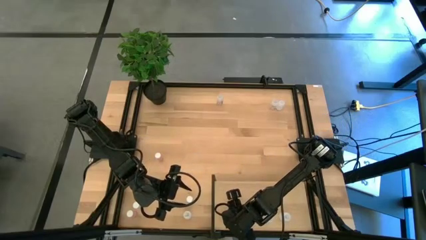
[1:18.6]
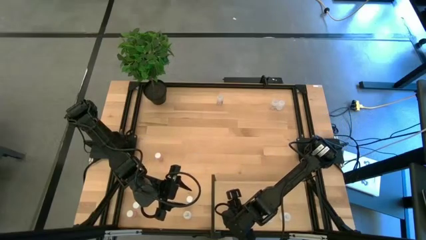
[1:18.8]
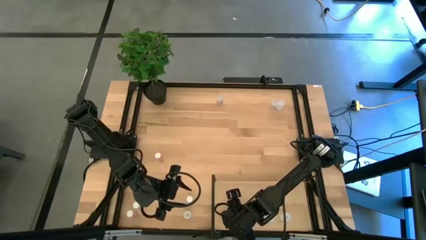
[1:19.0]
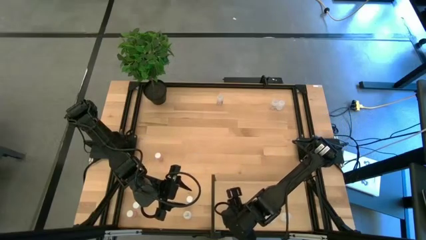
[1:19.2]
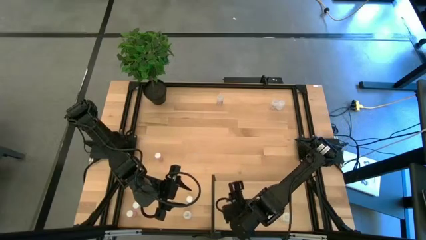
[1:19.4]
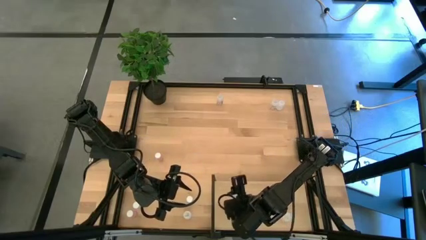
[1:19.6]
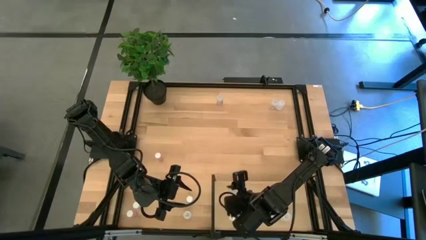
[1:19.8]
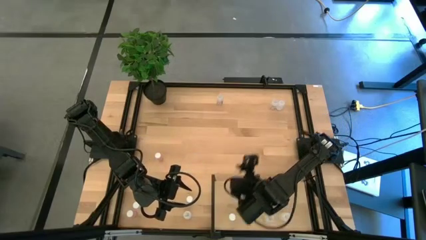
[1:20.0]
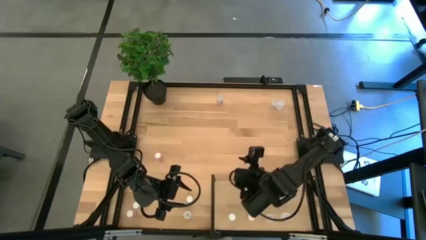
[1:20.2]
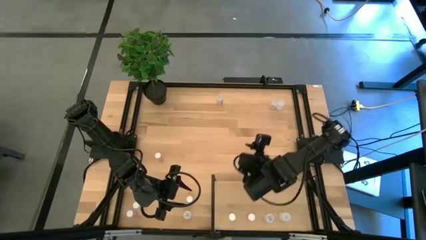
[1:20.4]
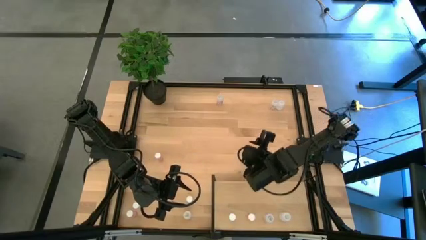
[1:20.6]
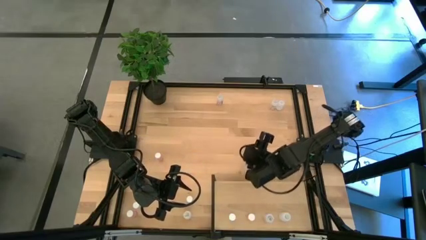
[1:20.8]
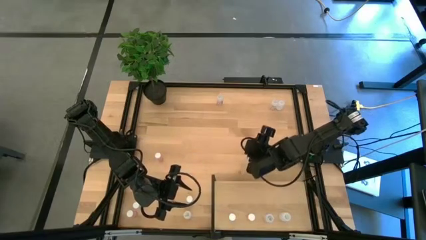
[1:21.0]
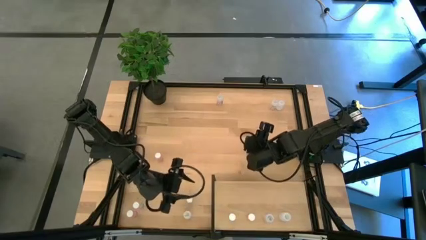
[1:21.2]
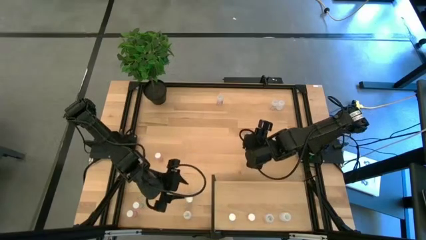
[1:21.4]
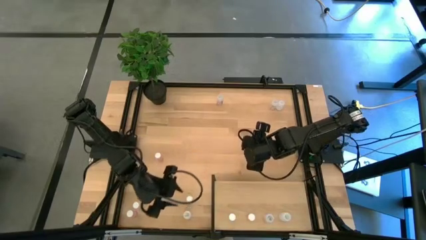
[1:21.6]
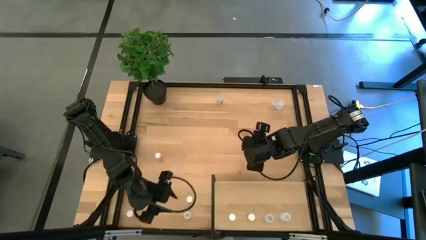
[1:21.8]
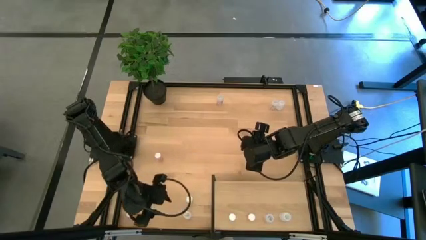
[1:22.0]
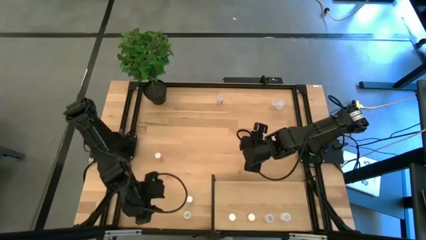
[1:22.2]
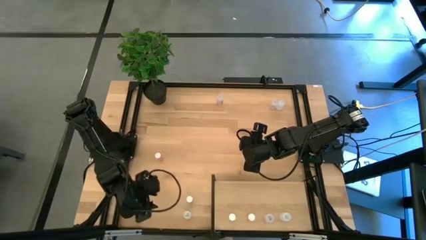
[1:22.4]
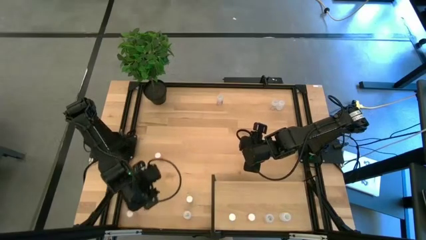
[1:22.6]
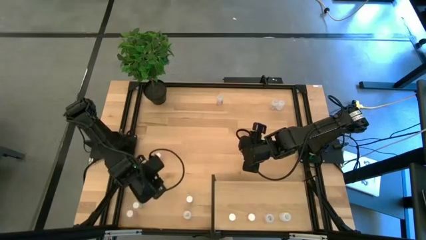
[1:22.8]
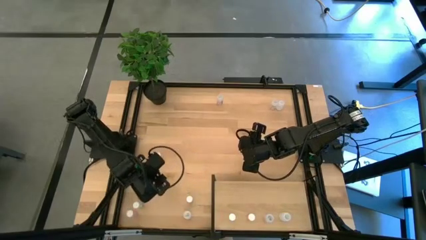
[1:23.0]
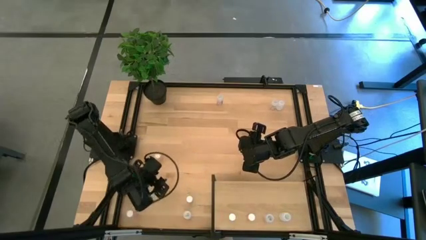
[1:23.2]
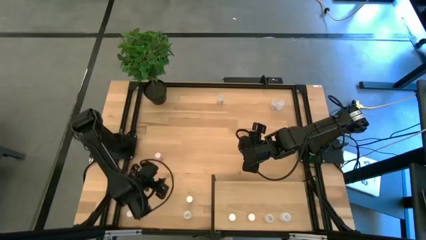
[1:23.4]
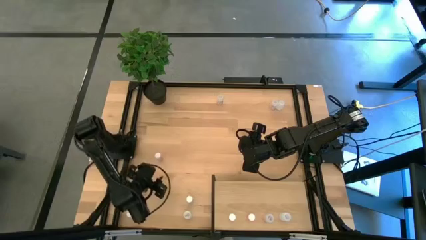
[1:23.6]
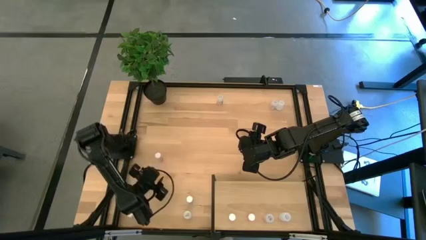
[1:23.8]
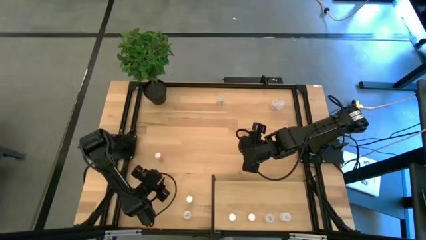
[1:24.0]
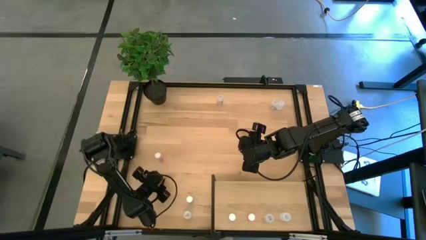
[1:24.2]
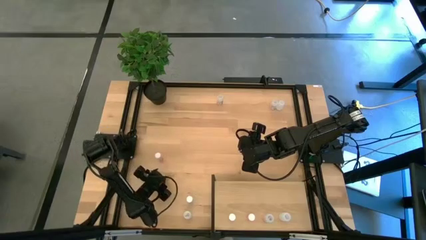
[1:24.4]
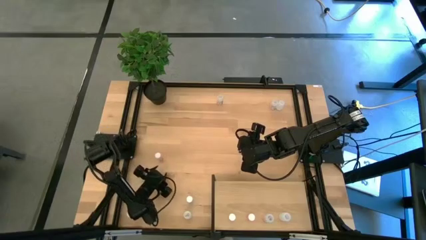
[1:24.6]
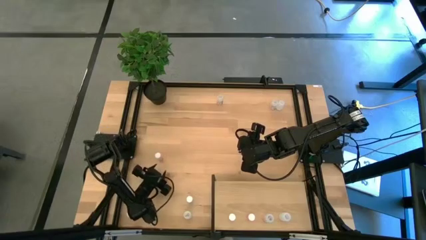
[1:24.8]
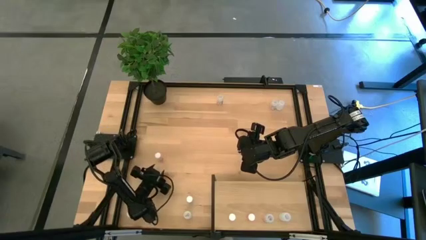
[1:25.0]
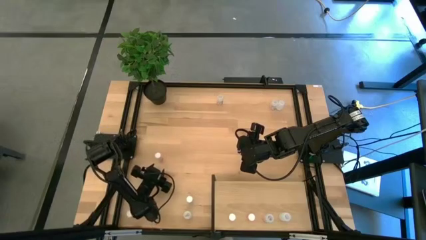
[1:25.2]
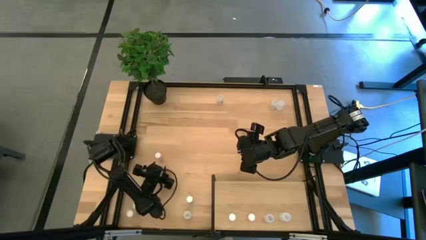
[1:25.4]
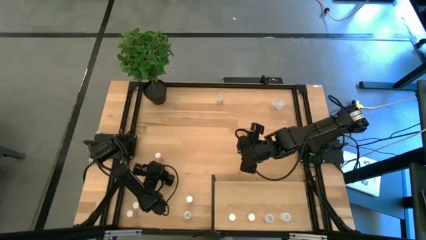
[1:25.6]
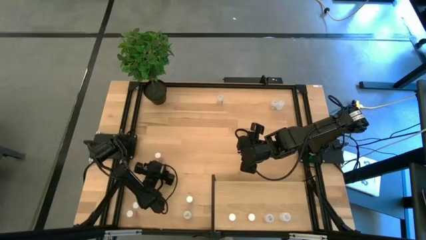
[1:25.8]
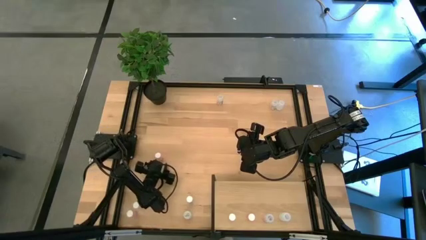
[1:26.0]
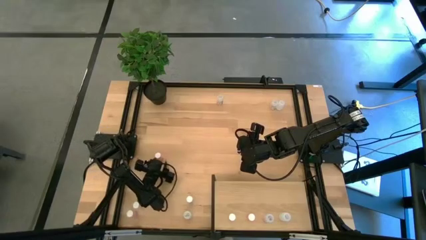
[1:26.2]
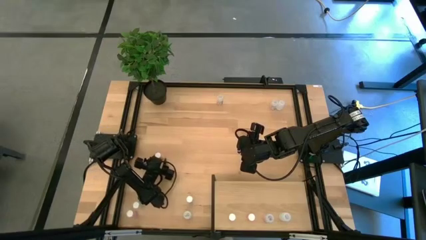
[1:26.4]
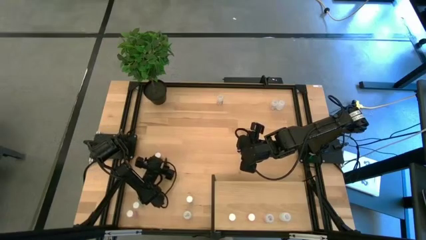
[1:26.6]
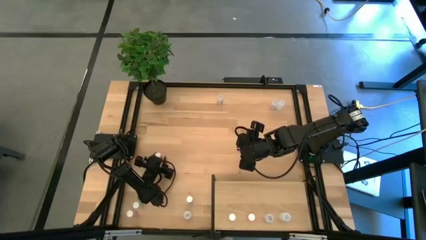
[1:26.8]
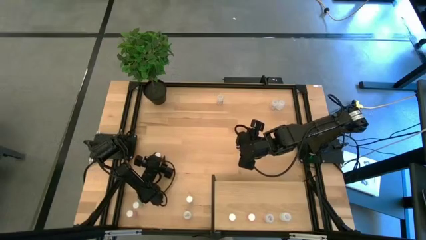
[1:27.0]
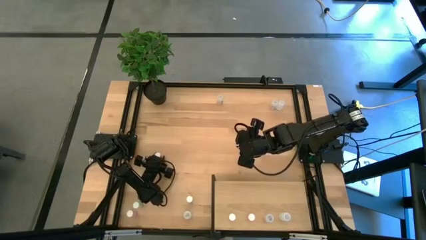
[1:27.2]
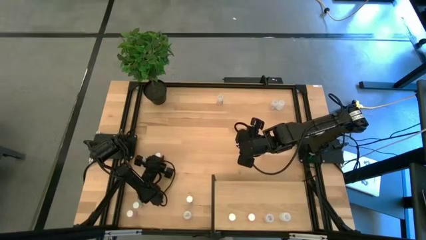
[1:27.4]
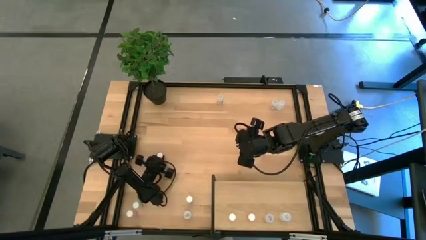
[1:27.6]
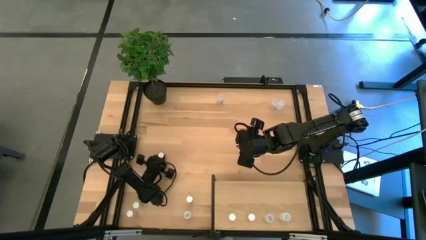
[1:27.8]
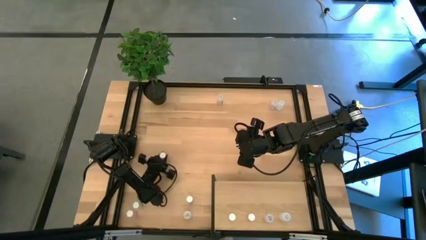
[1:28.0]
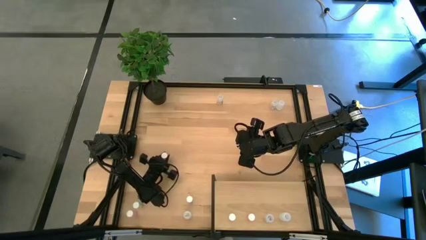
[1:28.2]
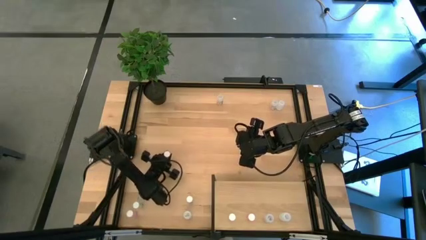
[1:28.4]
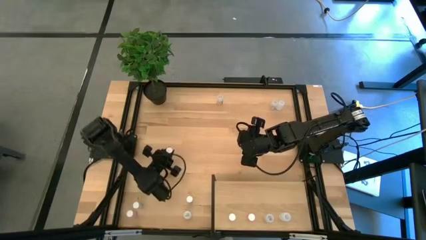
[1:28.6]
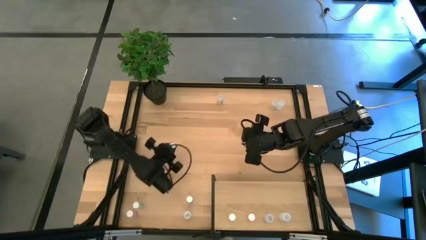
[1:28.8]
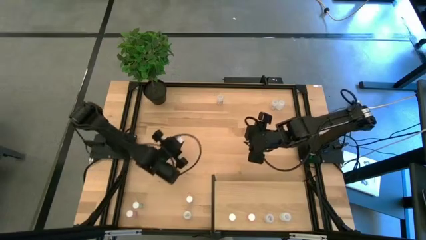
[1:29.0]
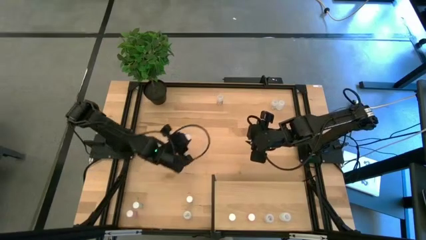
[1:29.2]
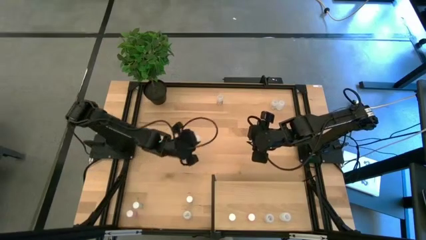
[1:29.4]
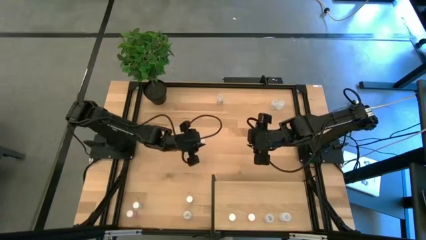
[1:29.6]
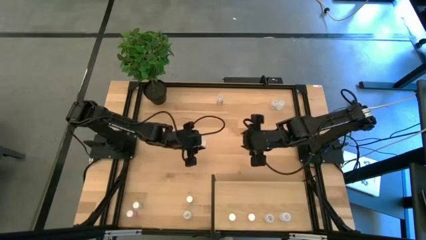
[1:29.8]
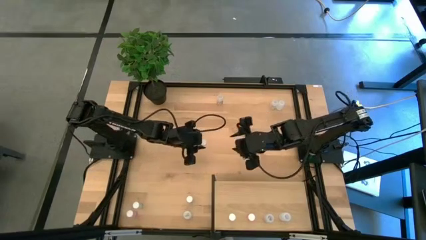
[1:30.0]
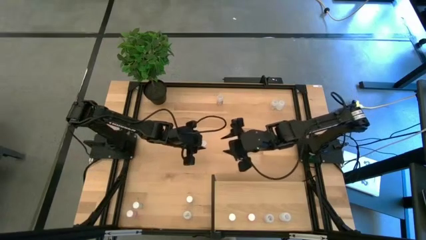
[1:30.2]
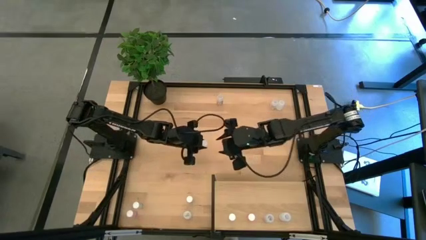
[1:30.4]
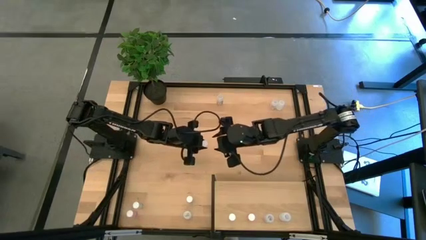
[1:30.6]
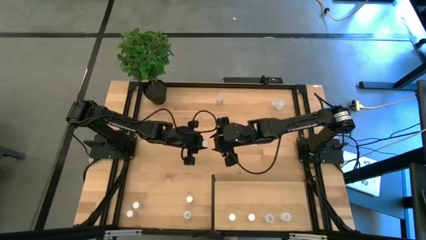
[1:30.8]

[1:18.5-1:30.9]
Task: Pick and place medicine bottles onto shelf by color
Put the top pink pill bottle on the shelf aligned with the other pink pill bottle
